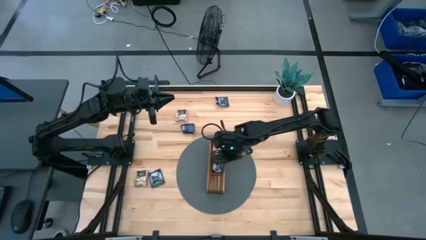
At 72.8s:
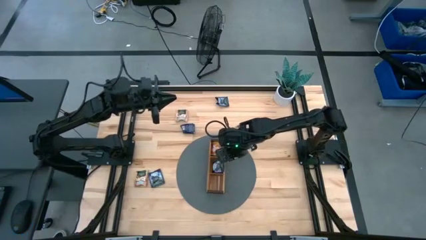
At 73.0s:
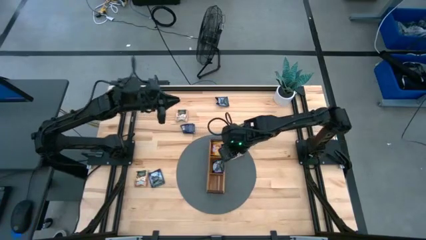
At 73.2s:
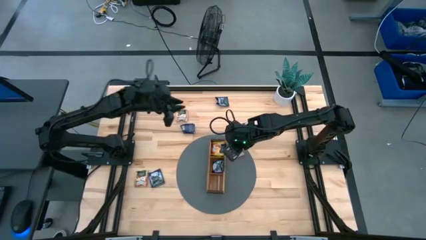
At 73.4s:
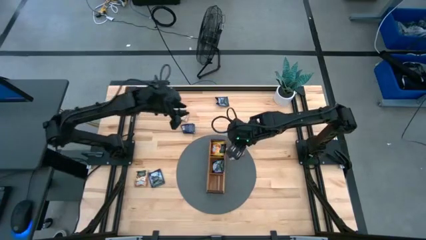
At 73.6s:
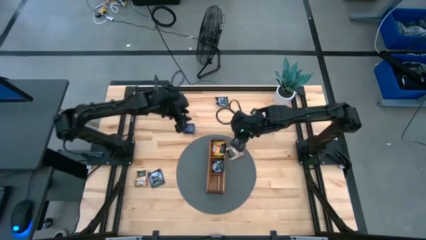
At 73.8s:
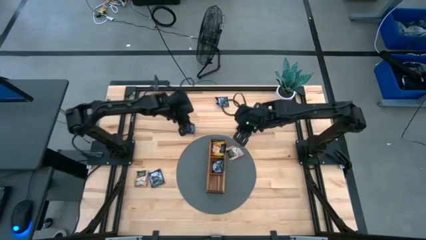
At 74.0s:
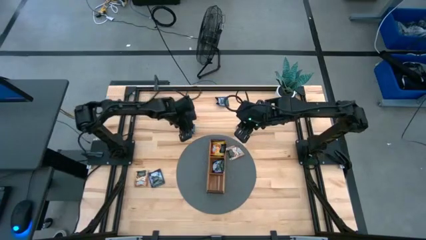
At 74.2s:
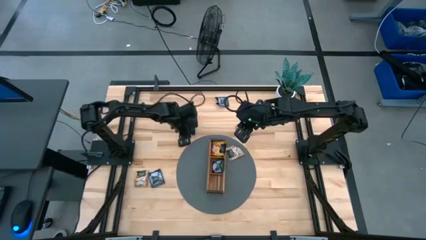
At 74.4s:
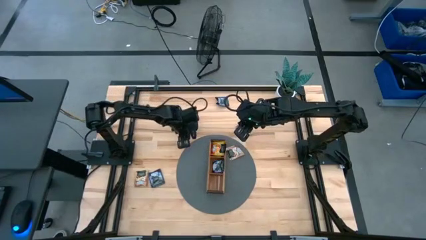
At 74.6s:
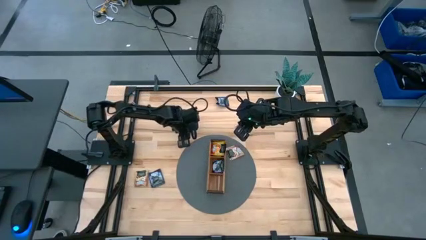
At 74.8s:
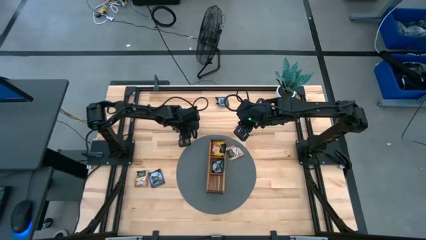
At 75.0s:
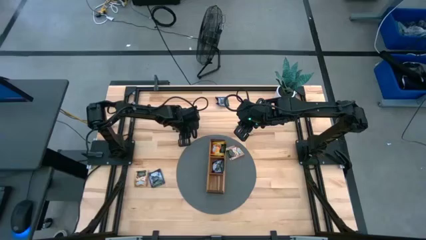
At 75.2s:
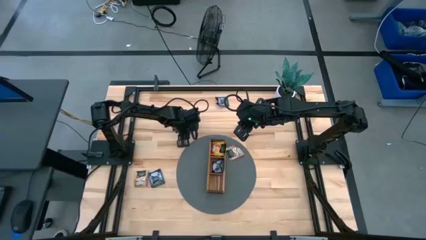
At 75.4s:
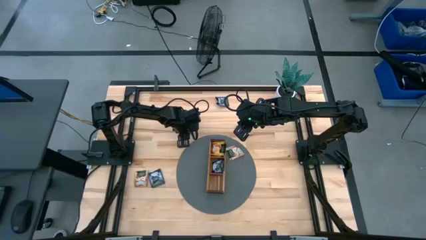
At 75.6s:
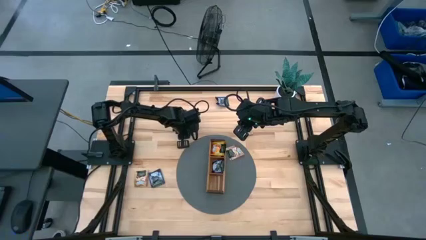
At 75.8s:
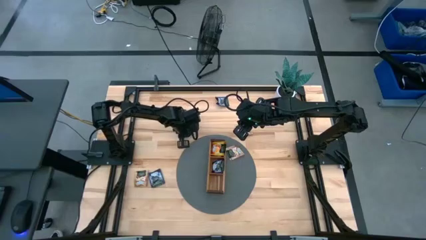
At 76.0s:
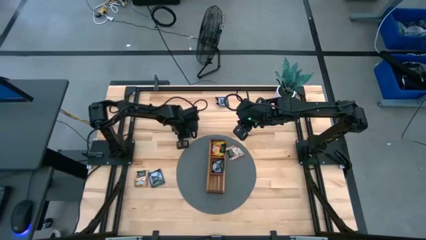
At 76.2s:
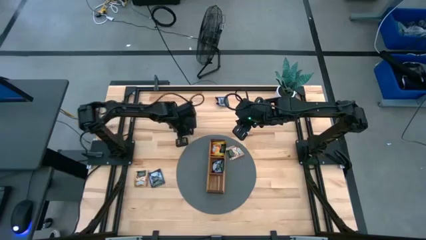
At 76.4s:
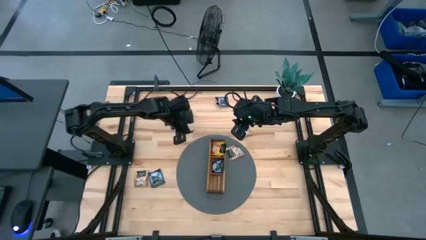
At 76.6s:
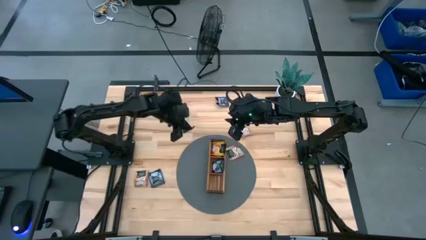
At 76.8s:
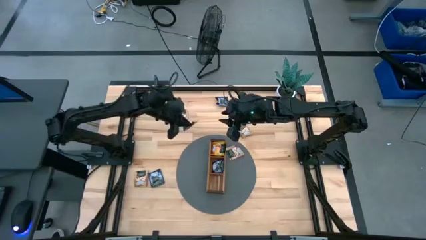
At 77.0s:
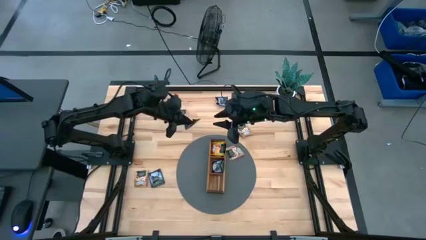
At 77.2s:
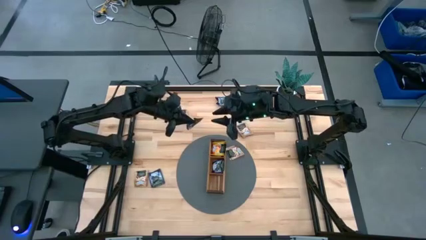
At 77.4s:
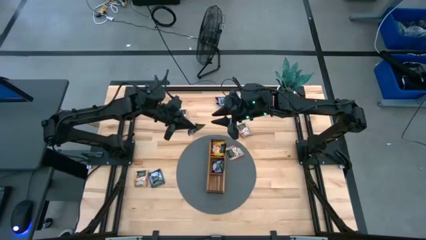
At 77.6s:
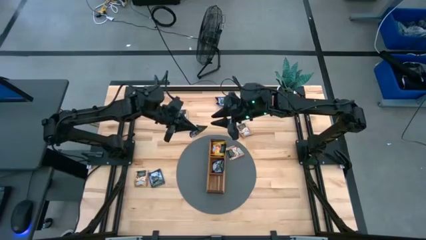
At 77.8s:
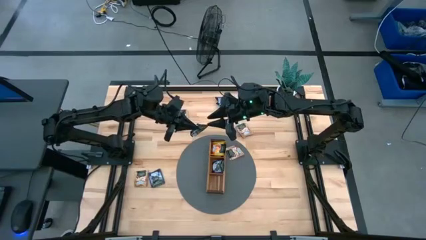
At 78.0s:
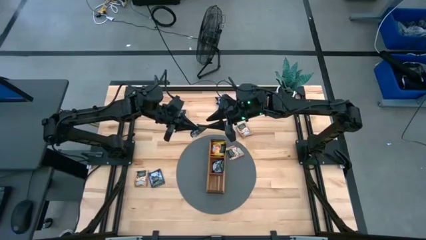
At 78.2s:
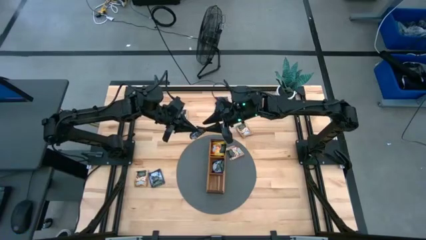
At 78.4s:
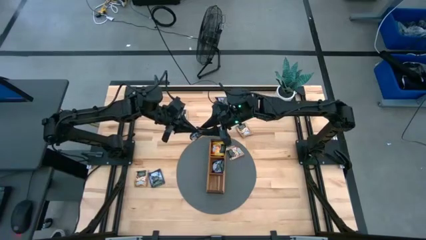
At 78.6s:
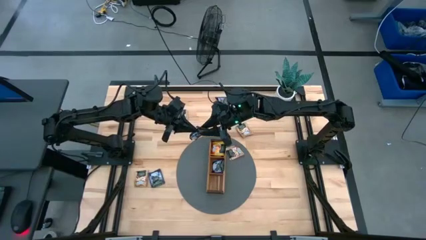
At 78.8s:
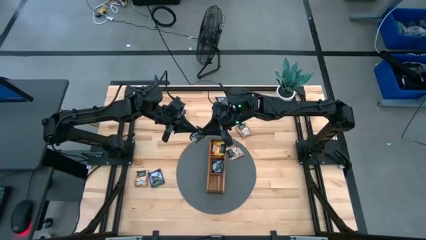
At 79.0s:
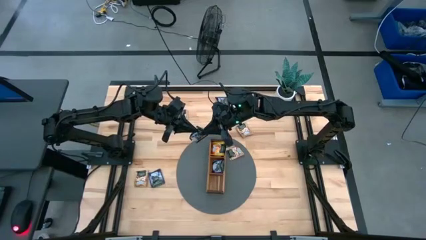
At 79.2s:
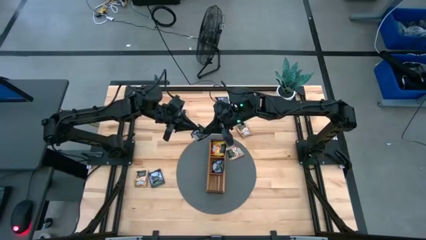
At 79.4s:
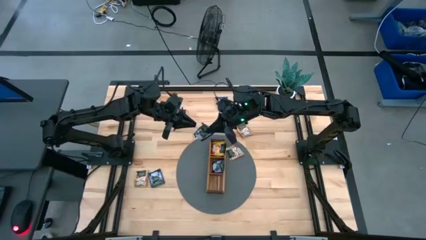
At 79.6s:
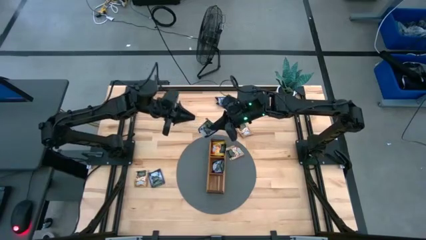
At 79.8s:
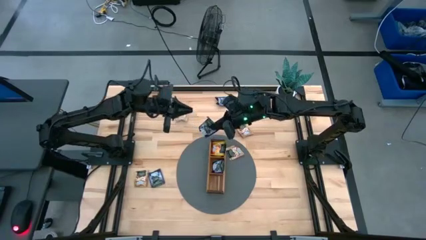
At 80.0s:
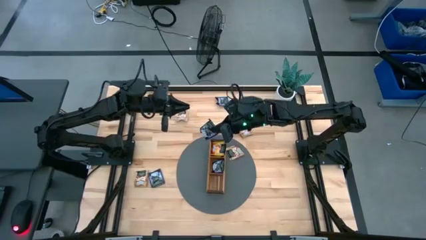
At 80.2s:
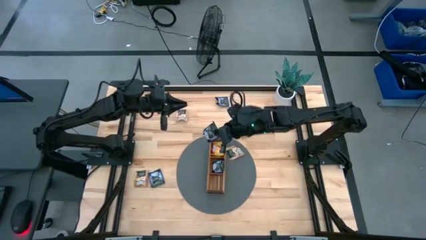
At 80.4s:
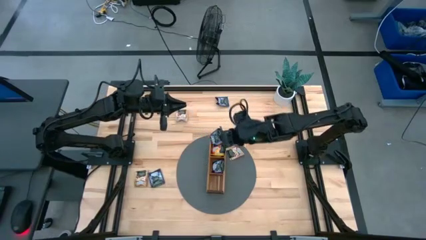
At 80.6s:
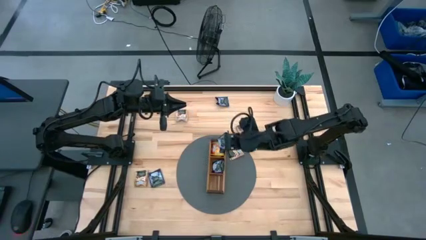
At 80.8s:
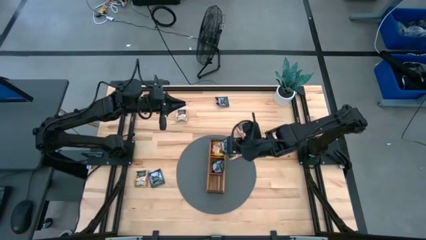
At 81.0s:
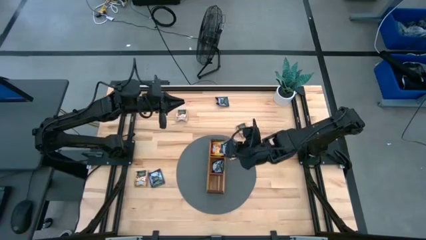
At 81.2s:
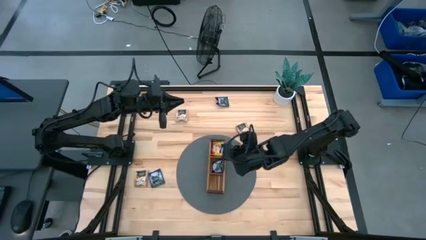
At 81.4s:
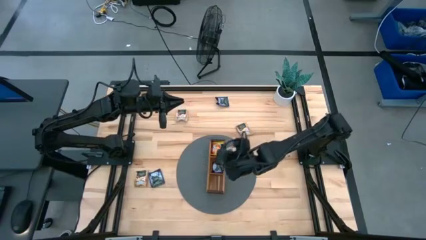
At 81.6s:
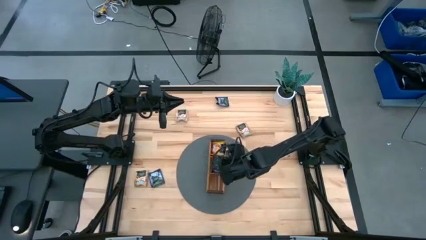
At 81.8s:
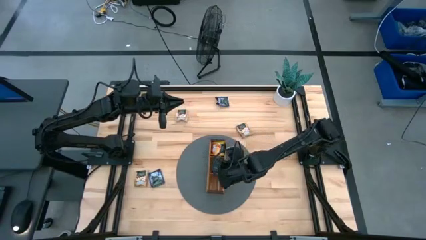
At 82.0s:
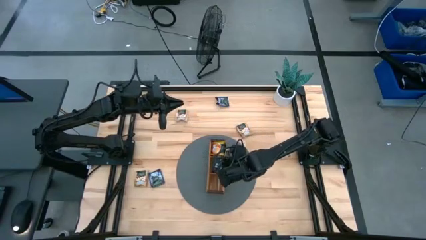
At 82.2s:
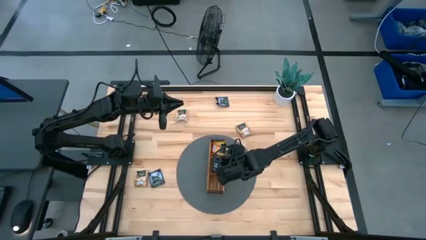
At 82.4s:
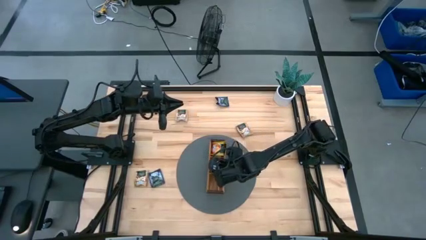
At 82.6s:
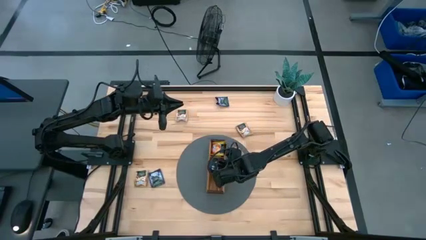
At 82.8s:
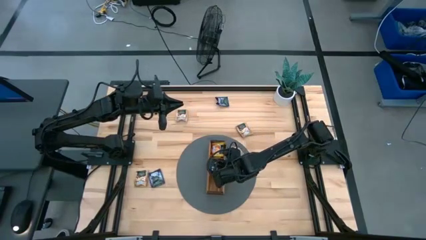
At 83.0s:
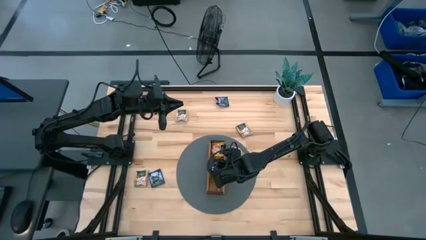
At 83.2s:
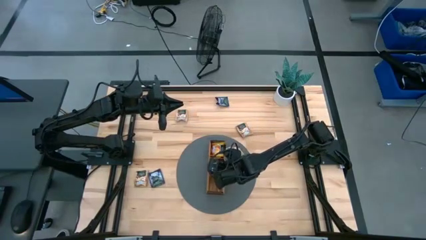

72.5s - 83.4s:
Task: Pick & Place Tea
Put the purple tea bag into the middle section of the wooden organizer

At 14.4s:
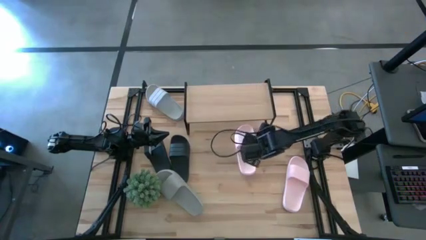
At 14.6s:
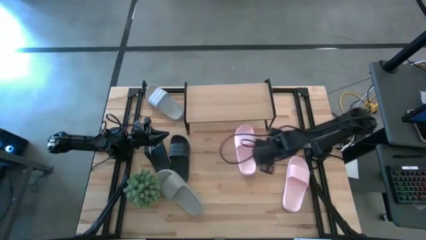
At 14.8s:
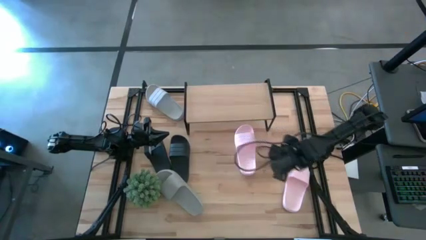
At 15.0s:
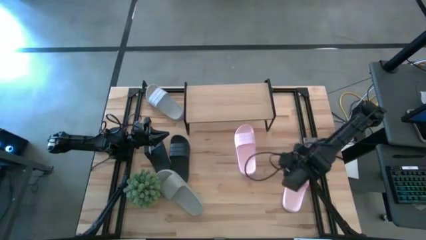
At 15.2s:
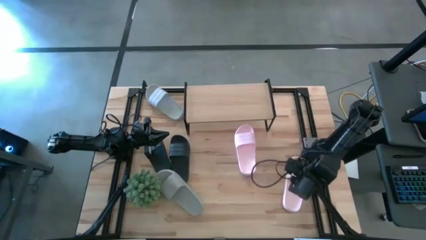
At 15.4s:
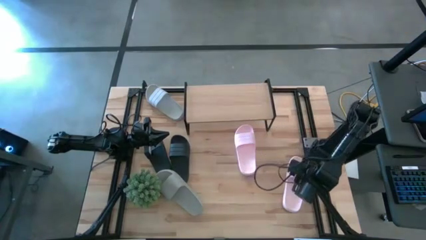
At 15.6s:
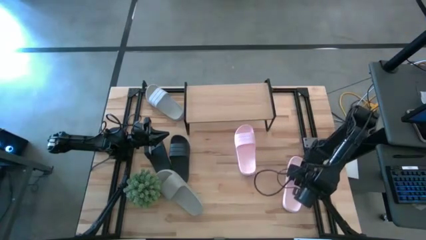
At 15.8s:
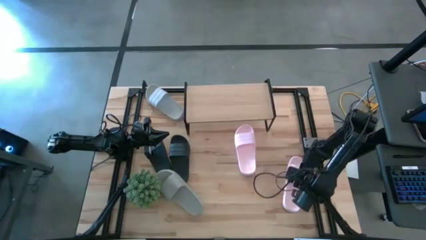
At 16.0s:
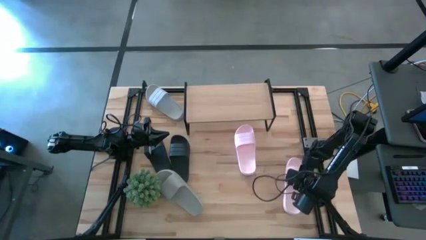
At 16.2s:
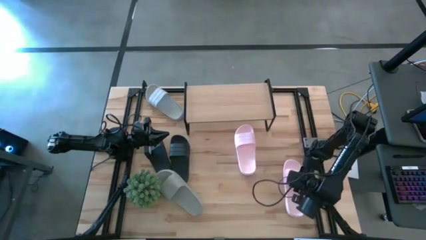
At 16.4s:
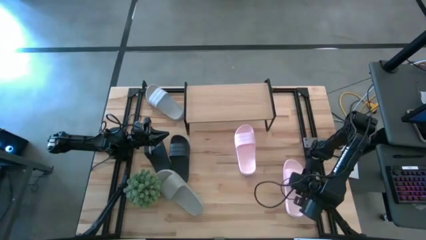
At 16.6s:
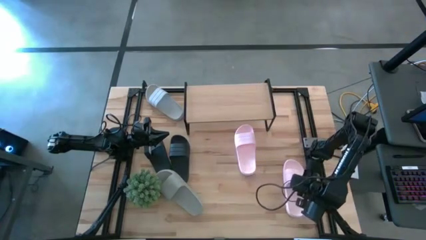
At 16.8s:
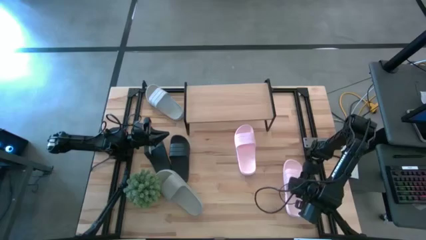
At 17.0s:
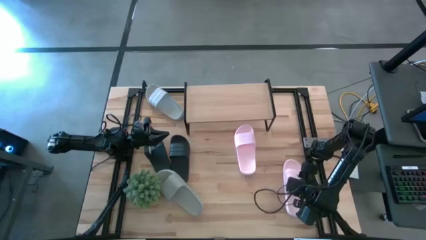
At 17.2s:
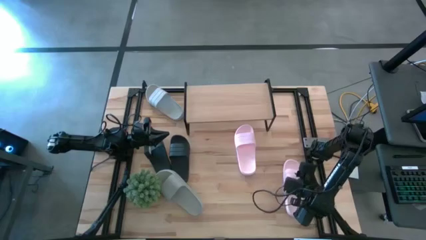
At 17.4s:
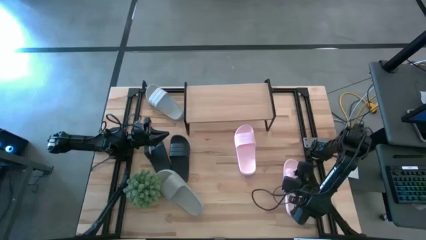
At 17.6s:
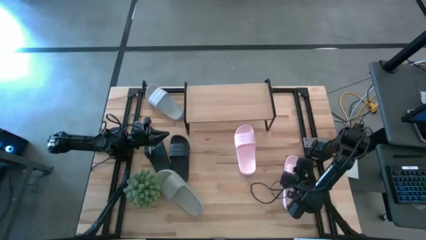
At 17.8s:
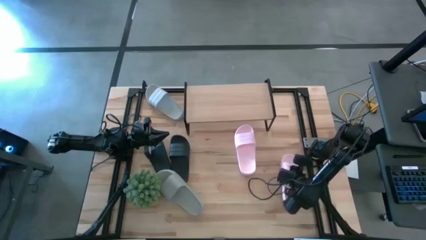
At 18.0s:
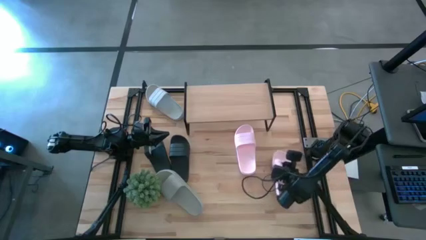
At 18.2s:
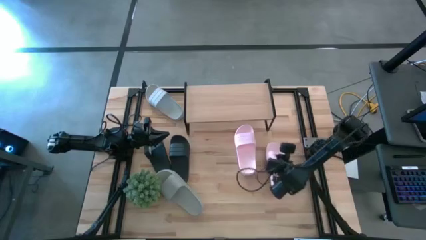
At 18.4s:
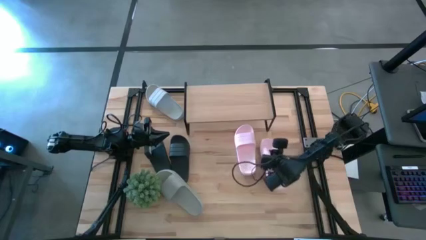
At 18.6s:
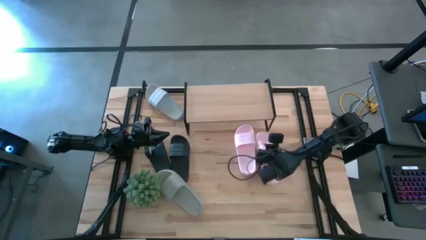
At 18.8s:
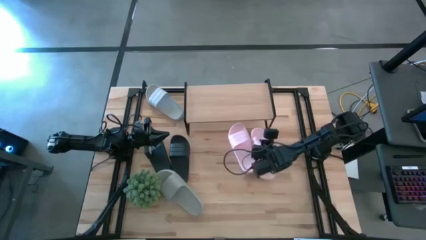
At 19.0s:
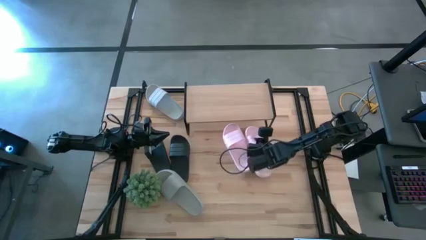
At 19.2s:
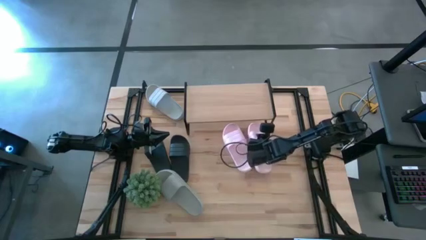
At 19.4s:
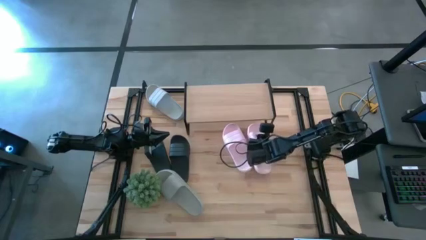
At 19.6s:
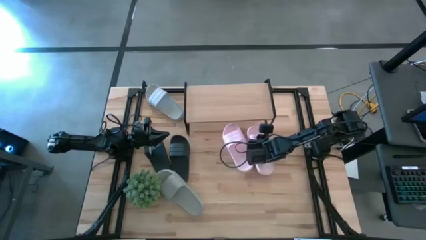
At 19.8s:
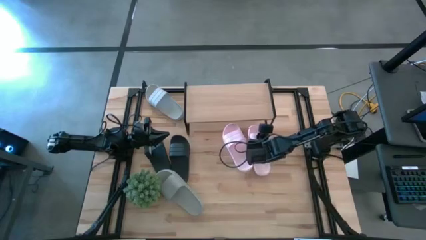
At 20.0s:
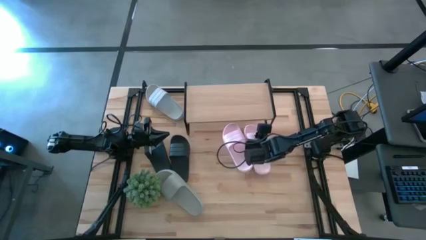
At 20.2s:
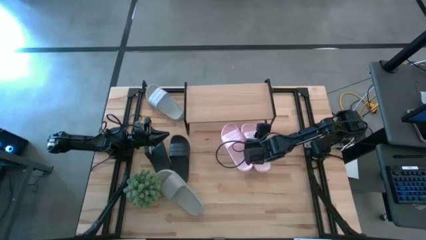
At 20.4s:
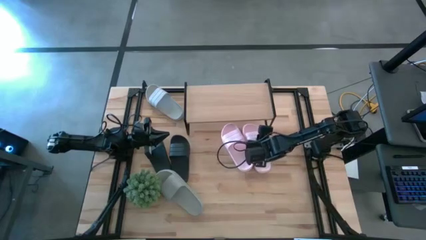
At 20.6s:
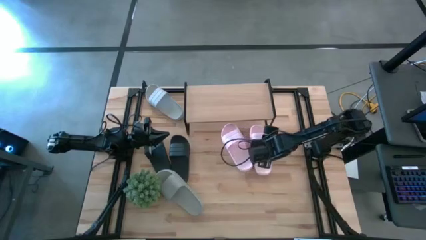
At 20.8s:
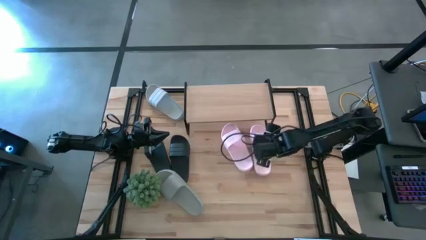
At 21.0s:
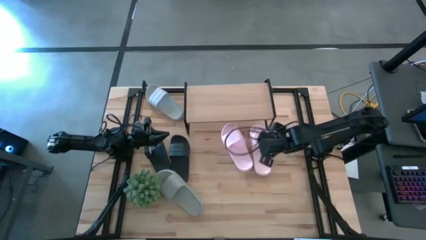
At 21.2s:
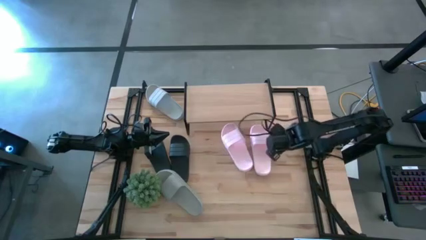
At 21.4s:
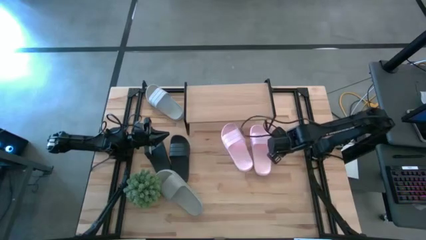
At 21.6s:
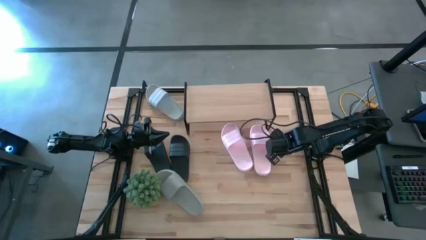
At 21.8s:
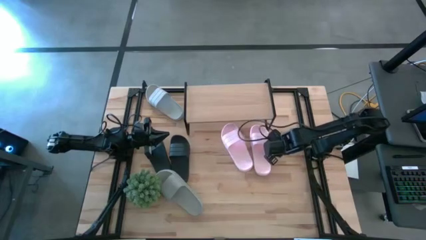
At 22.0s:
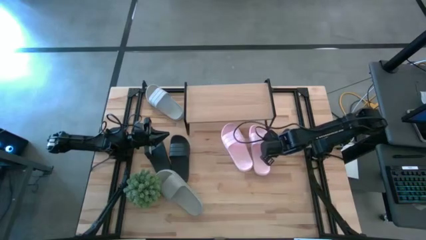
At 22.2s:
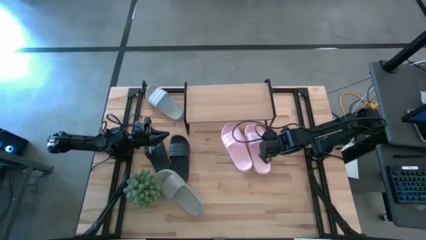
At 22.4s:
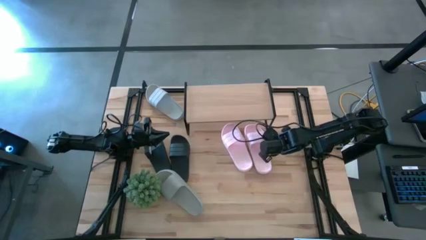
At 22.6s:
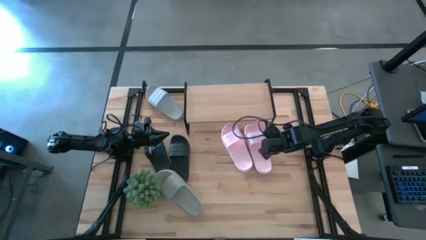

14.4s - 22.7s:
Task: Pick and place slides into the shelf
Put the pink slide under the shelf
